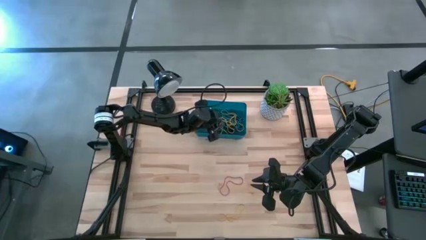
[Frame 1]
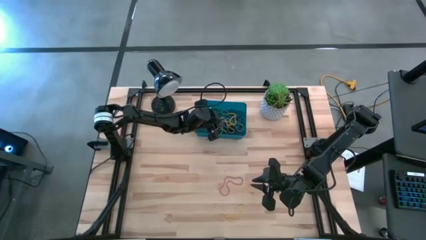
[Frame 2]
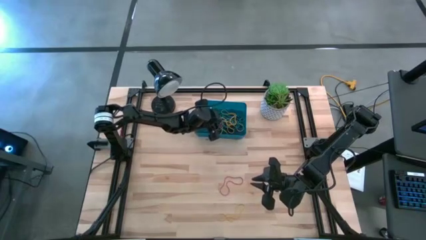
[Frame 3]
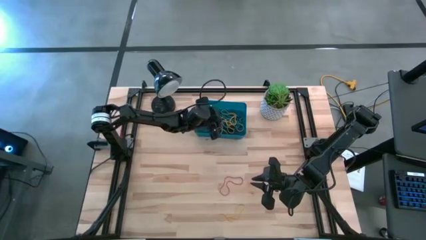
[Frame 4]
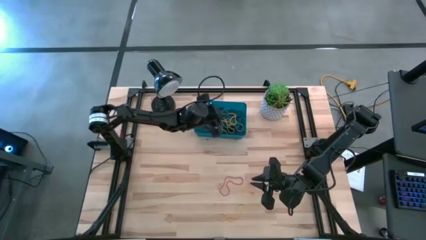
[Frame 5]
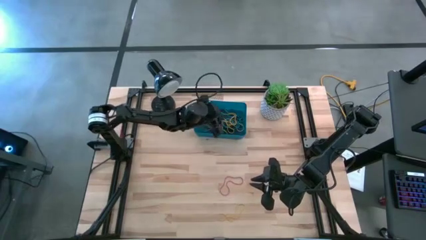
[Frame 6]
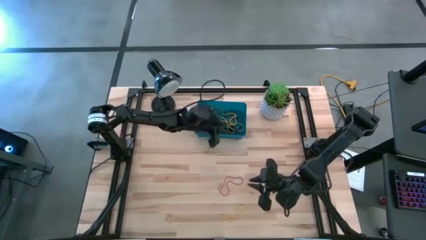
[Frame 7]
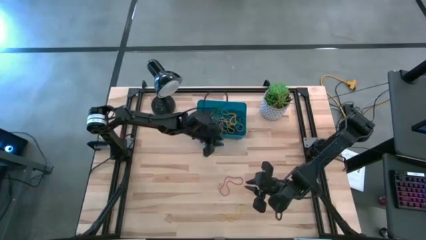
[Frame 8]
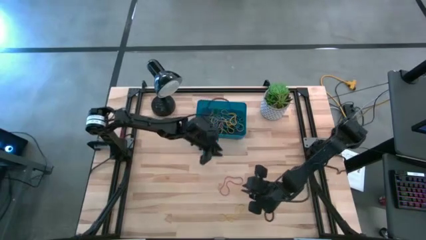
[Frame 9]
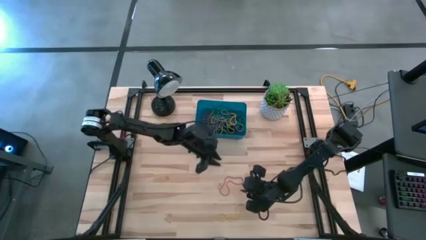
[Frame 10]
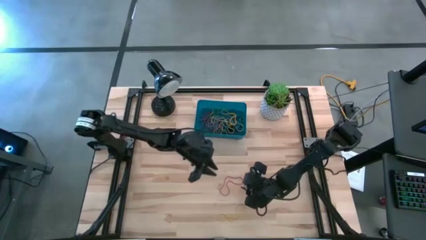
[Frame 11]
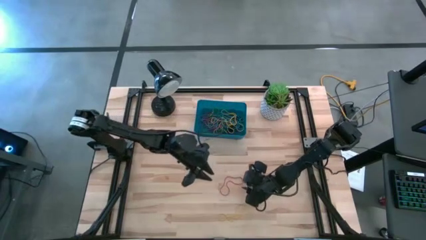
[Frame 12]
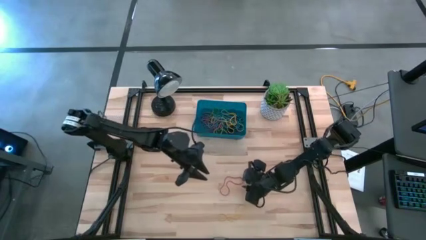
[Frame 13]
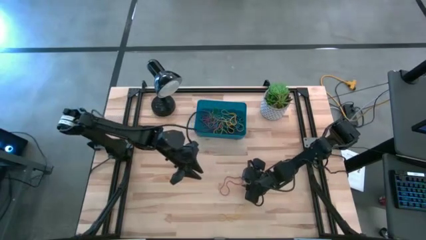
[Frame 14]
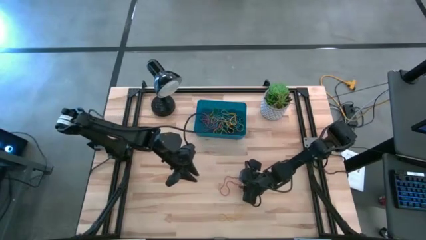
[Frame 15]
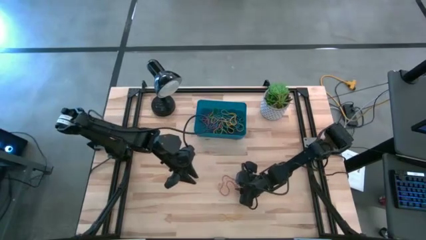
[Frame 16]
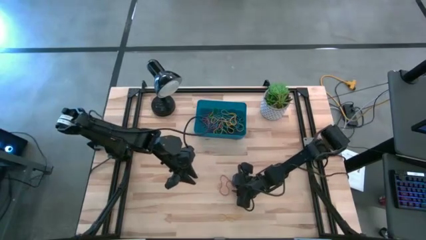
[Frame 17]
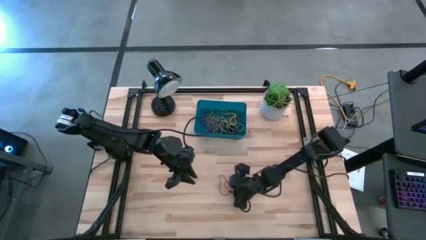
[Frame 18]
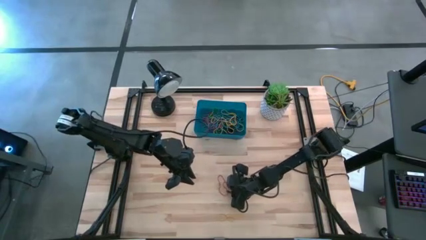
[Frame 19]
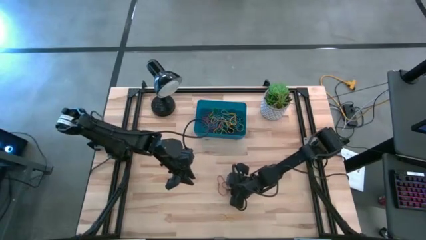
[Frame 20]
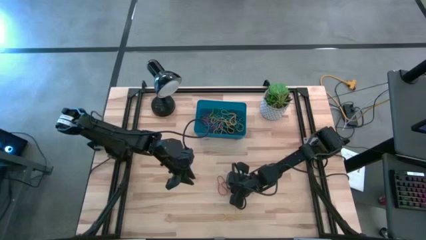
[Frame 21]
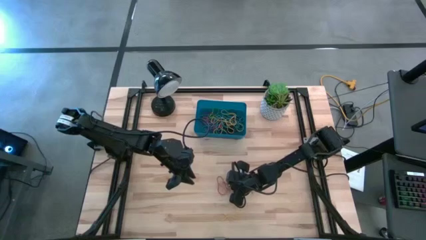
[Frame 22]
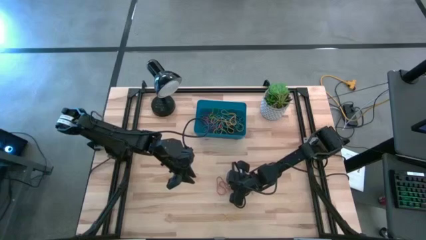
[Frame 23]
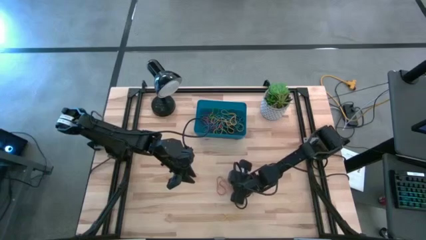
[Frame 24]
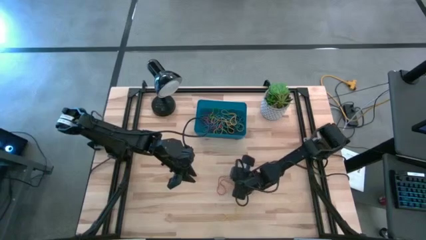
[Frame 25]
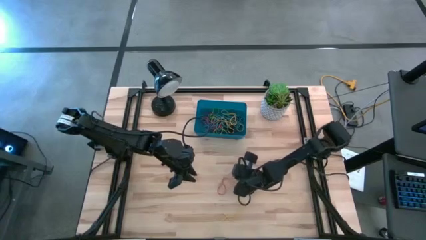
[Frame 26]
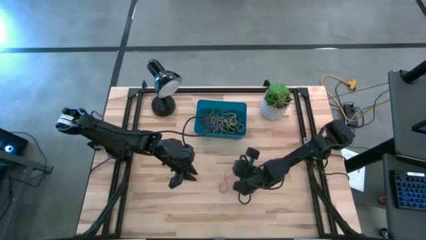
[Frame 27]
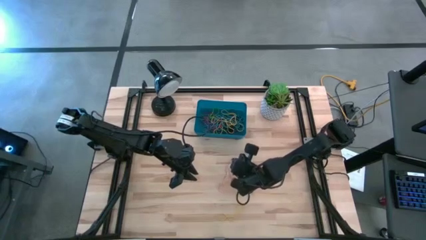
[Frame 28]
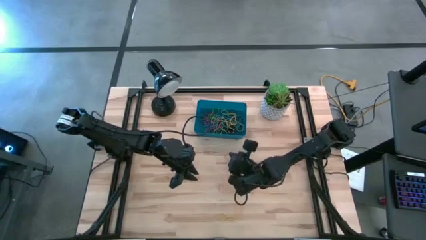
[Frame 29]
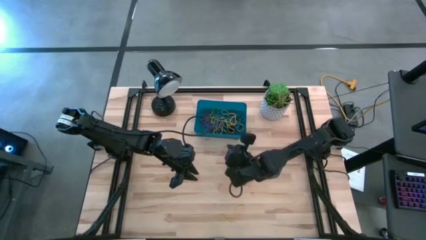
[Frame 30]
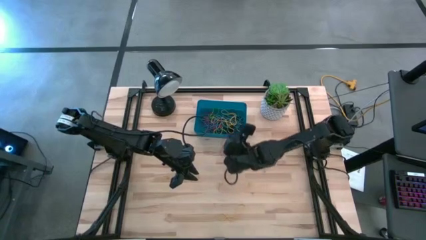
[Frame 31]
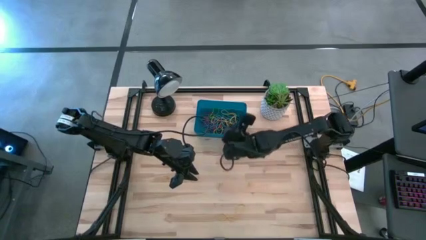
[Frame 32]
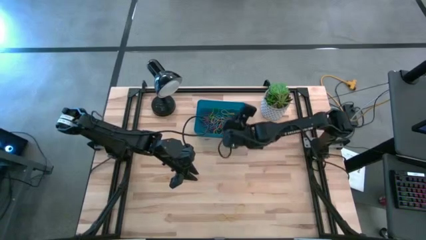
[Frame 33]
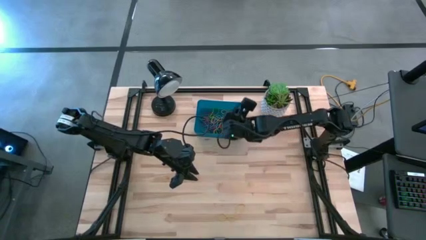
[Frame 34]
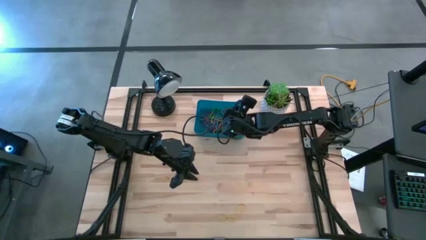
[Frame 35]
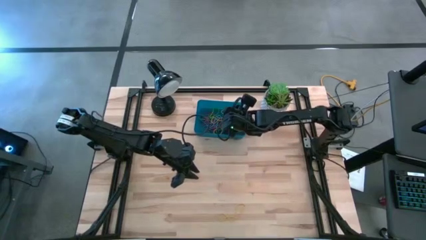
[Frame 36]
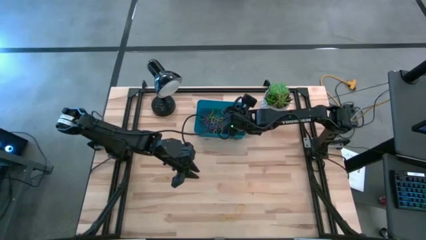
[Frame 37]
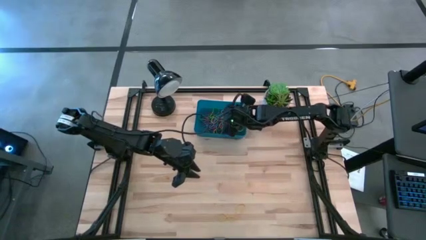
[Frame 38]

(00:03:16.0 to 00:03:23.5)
Task: Pick and place rubber bands into bin
Put the red rubber band into the blue bin

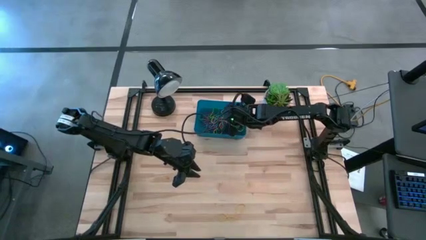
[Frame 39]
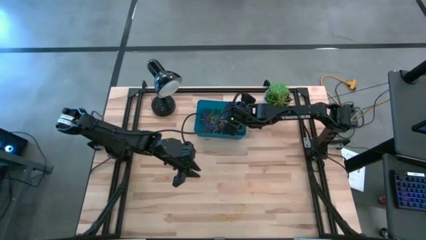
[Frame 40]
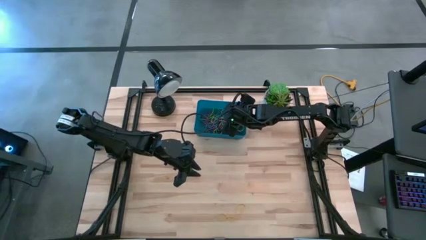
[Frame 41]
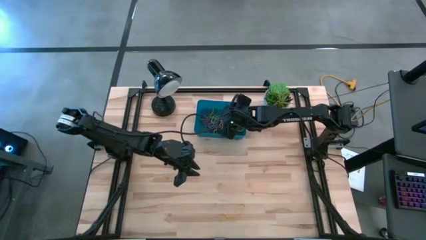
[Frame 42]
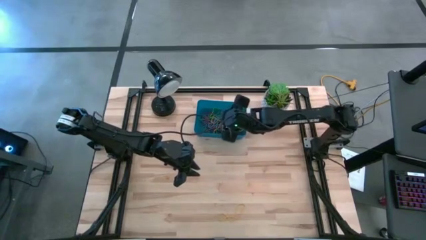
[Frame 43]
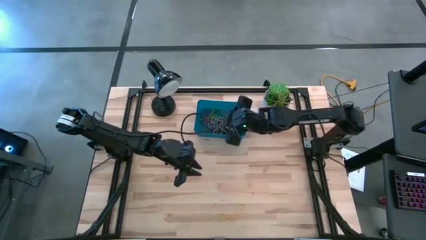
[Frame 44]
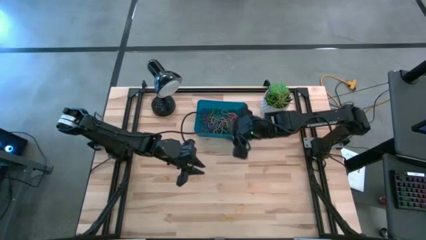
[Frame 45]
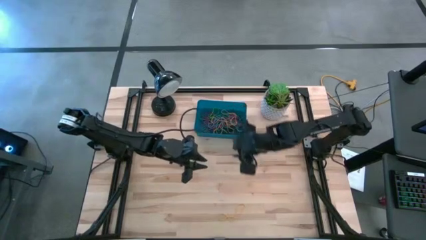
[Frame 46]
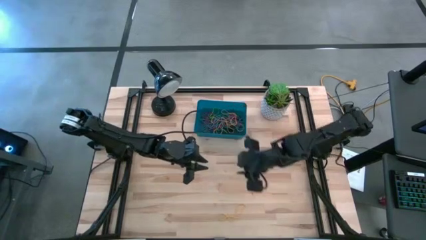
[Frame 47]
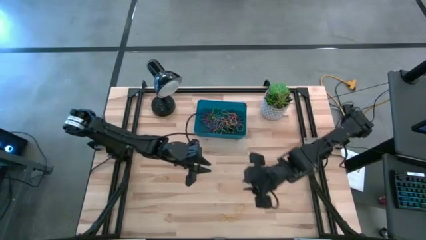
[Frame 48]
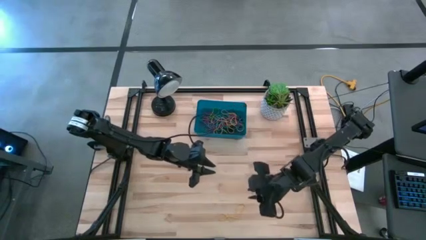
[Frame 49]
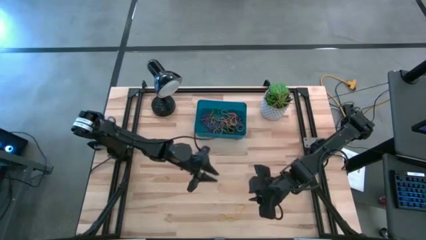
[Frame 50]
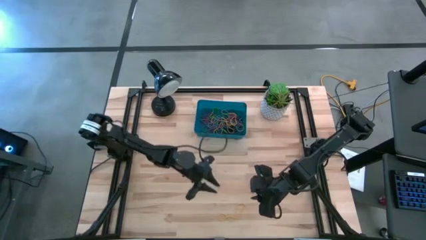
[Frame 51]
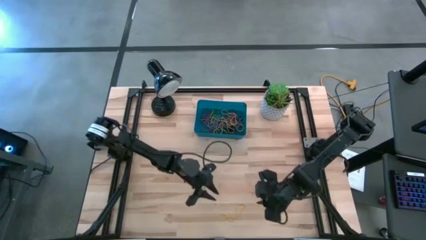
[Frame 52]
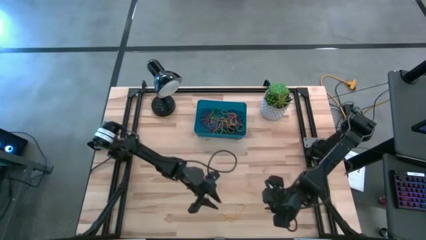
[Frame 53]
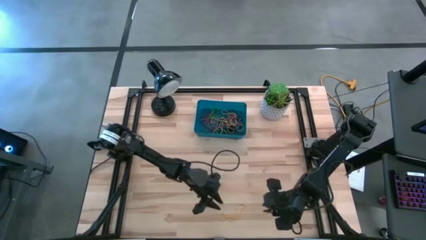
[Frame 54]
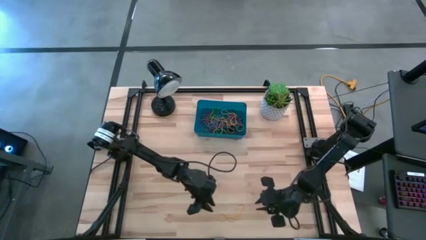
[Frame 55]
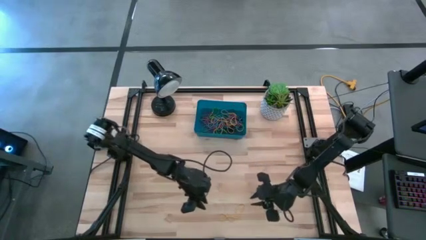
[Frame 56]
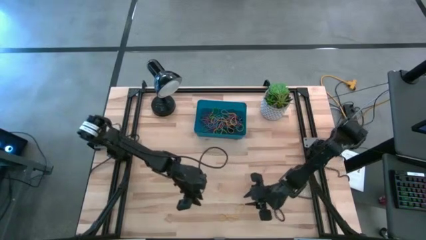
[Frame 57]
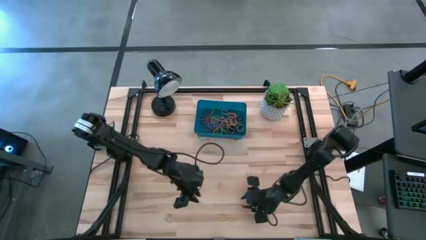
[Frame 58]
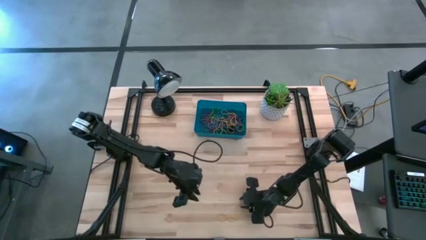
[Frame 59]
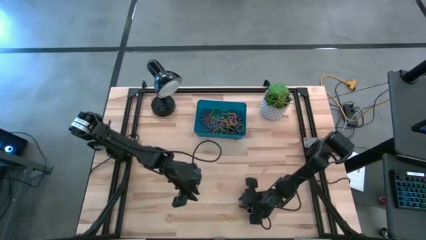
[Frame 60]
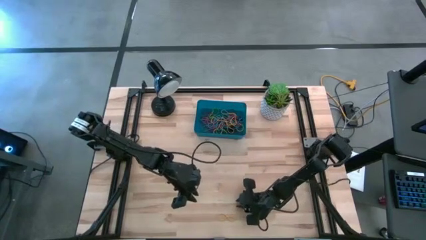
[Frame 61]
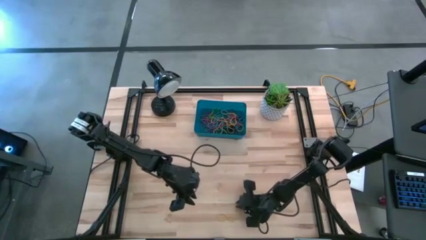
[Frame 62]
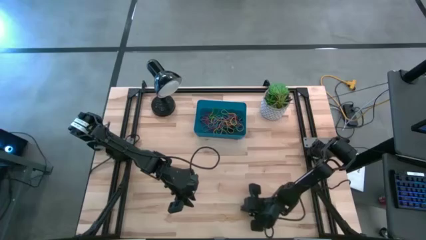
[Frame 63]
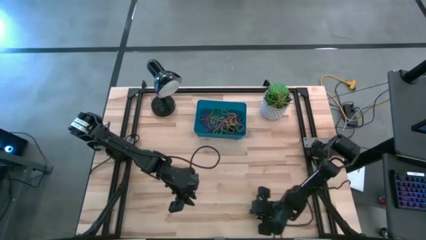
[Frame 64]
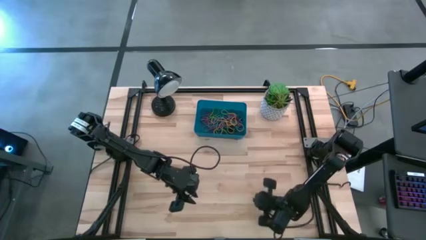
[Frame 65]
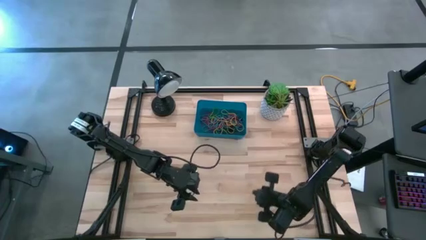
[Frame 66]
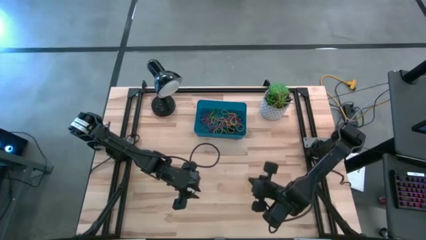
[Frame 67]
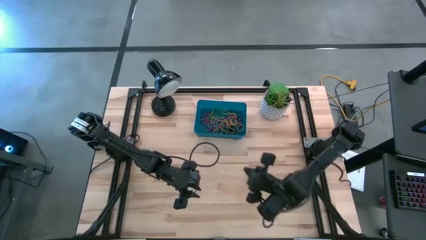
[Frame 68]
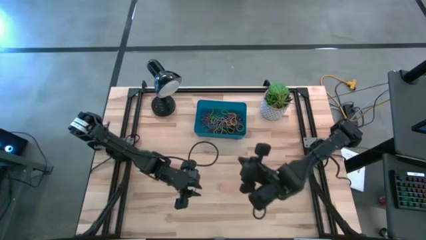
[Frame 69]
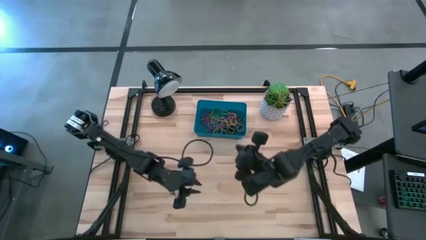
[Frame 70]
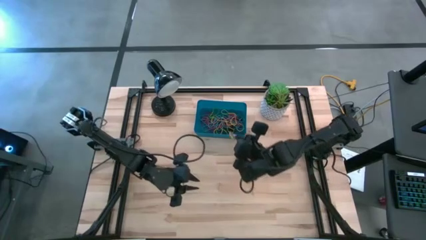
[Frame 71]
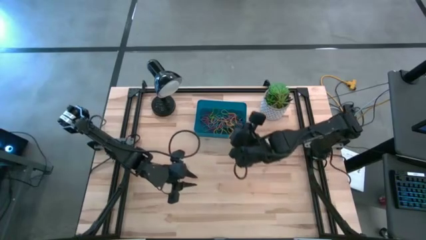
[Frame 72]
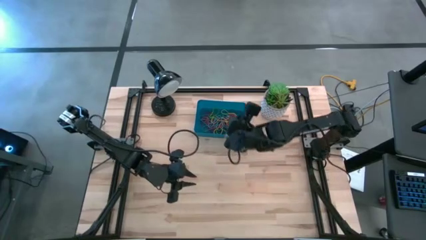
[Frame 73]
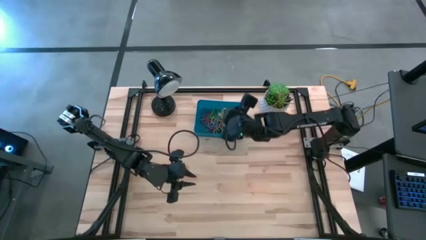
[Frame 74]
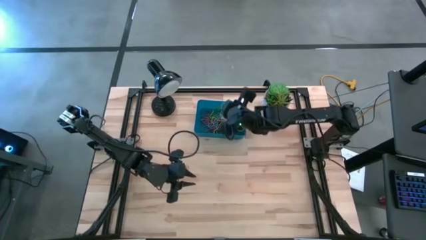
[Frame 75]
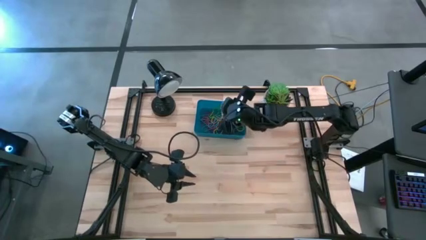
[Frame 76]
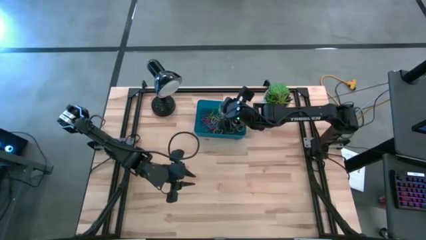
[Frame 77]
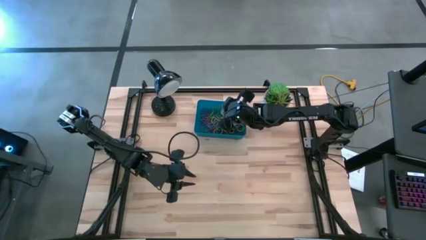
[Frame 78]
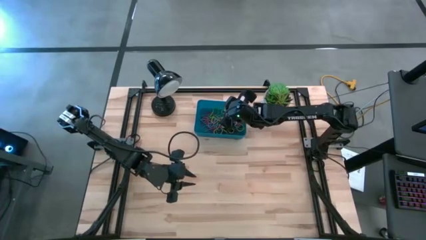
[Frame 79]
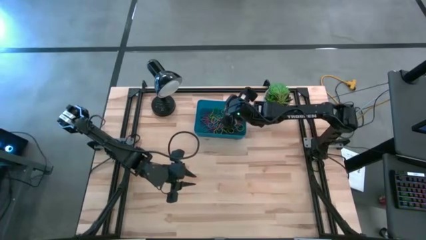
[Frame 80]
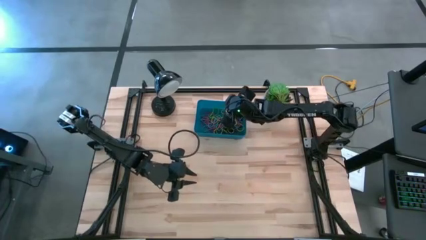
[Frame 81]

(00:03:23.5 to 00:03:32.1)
Put the yellow rubber band into the blue bin
